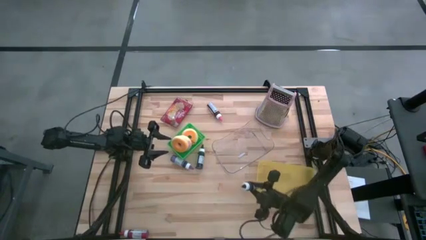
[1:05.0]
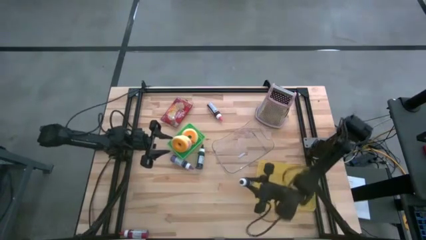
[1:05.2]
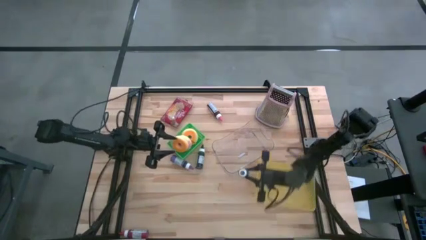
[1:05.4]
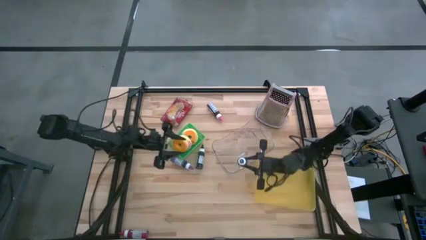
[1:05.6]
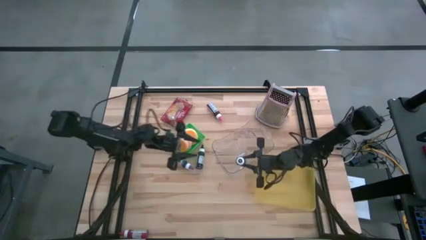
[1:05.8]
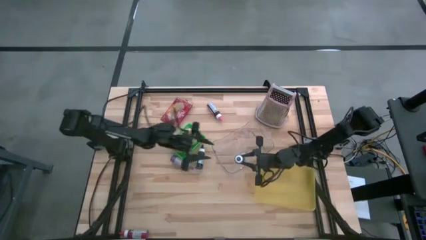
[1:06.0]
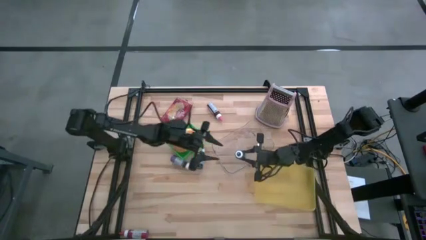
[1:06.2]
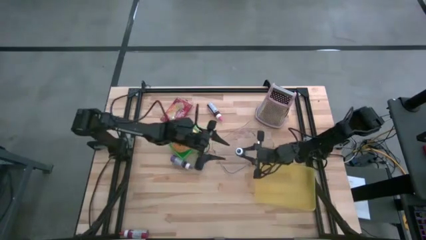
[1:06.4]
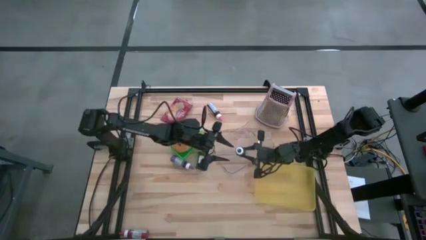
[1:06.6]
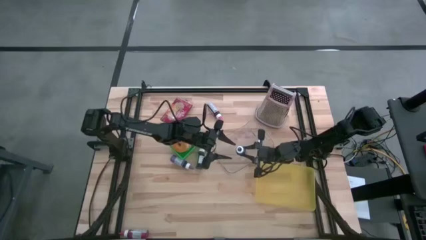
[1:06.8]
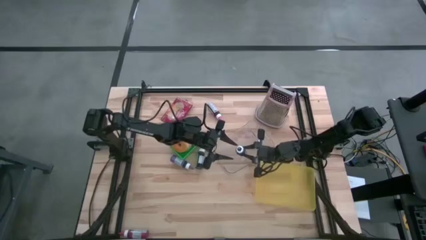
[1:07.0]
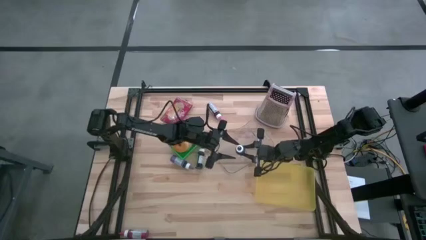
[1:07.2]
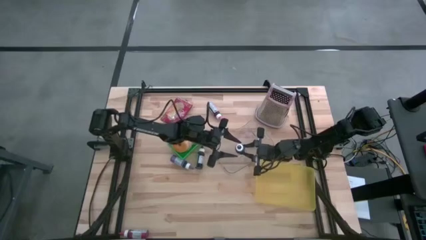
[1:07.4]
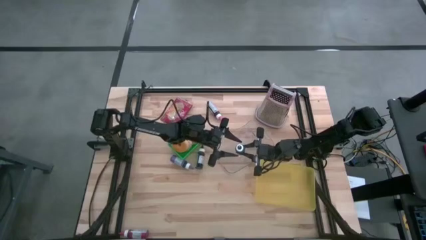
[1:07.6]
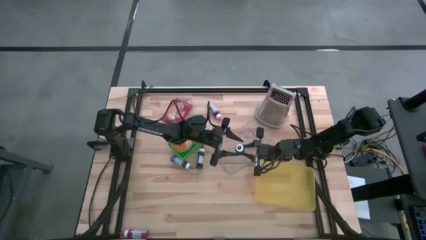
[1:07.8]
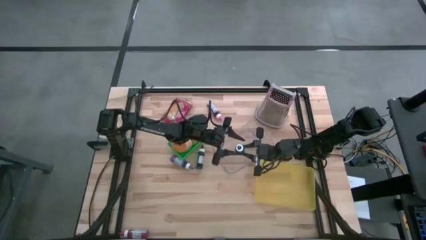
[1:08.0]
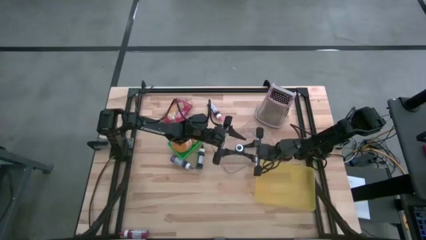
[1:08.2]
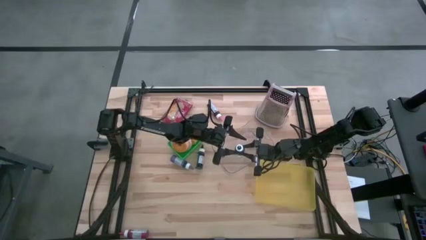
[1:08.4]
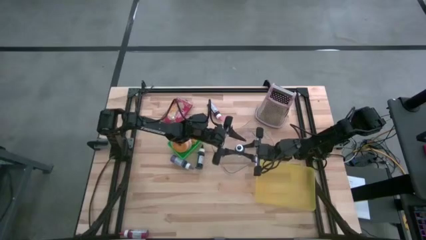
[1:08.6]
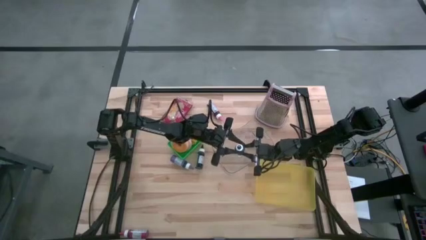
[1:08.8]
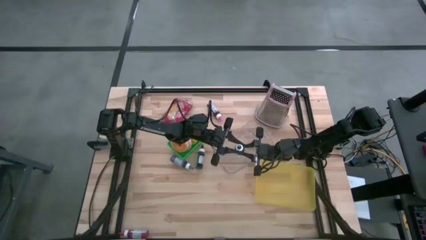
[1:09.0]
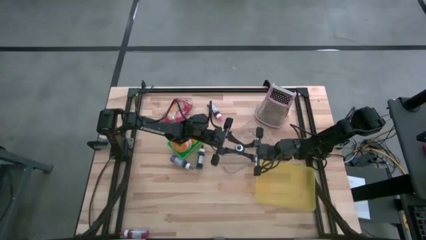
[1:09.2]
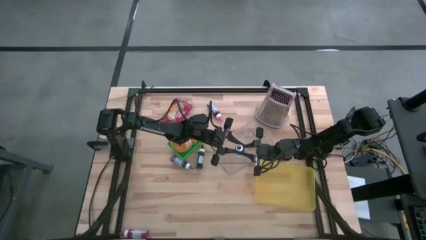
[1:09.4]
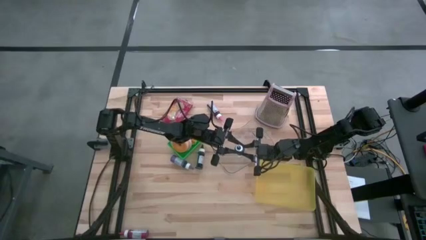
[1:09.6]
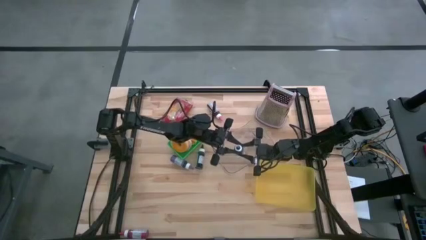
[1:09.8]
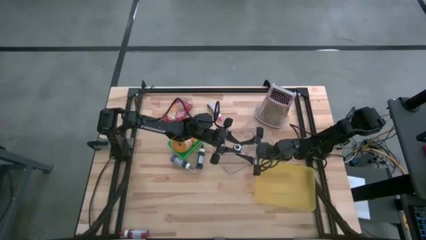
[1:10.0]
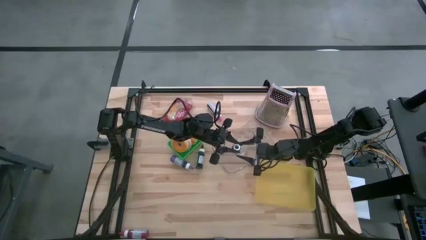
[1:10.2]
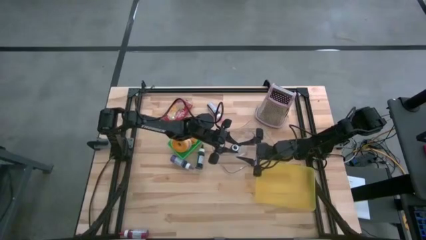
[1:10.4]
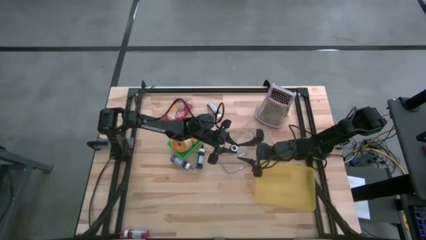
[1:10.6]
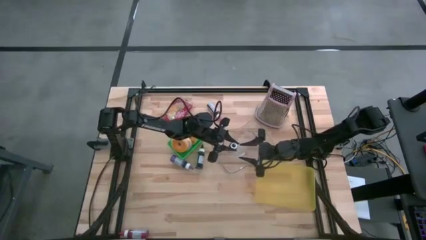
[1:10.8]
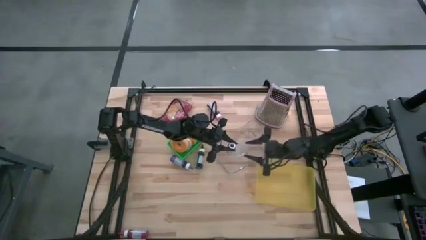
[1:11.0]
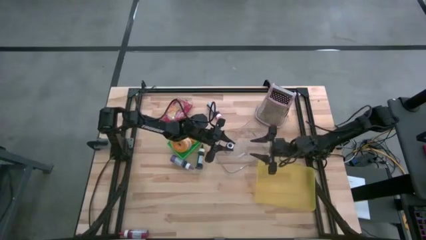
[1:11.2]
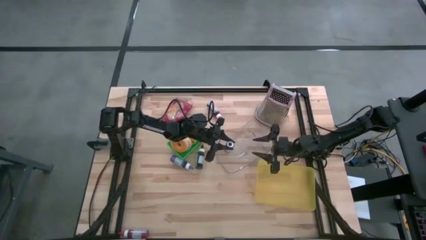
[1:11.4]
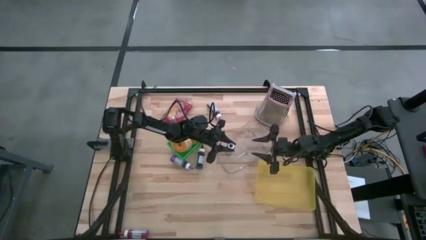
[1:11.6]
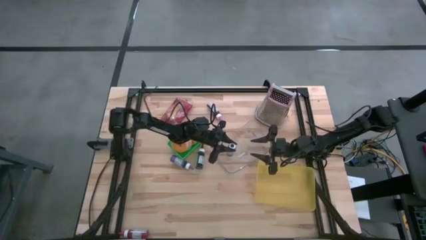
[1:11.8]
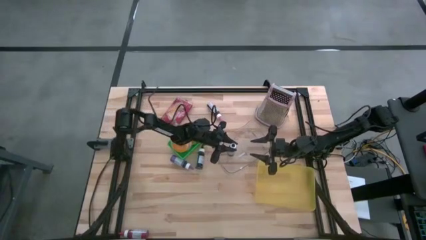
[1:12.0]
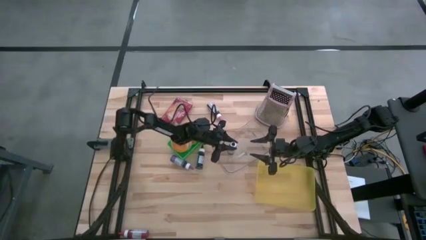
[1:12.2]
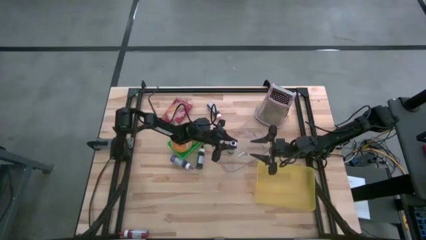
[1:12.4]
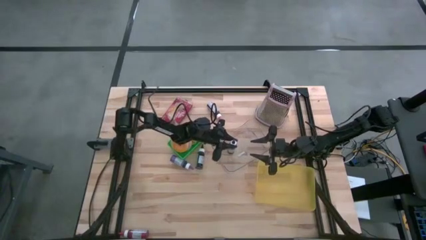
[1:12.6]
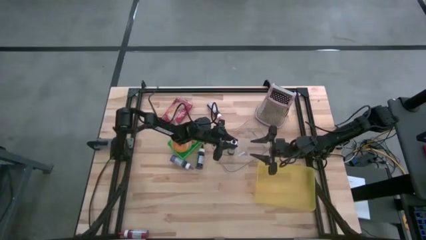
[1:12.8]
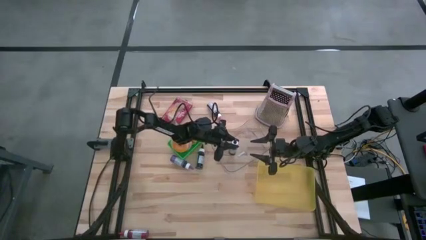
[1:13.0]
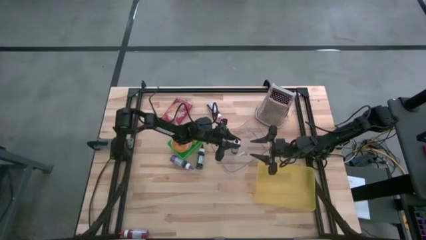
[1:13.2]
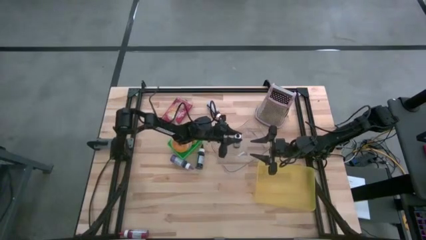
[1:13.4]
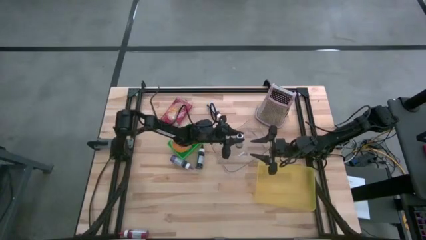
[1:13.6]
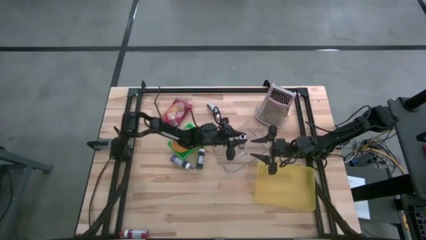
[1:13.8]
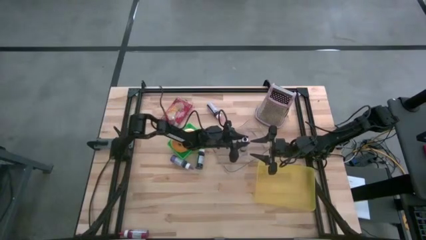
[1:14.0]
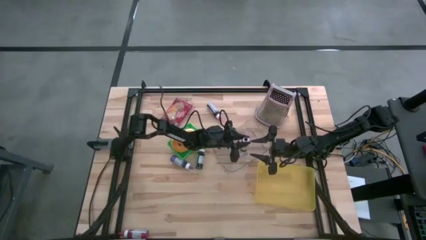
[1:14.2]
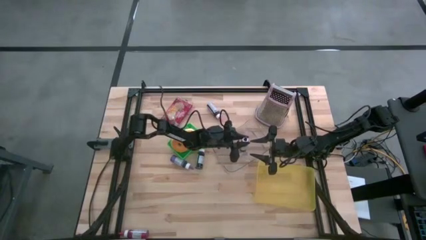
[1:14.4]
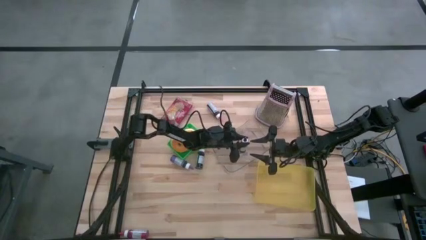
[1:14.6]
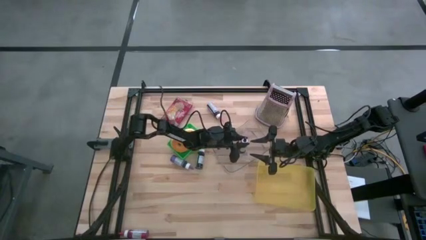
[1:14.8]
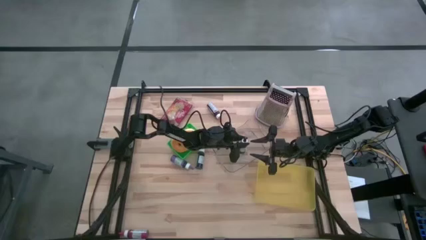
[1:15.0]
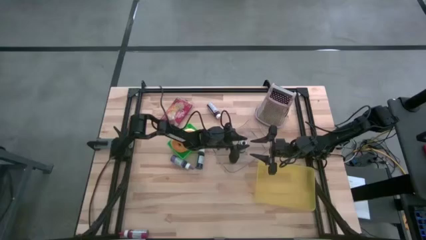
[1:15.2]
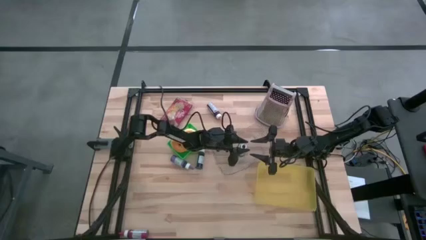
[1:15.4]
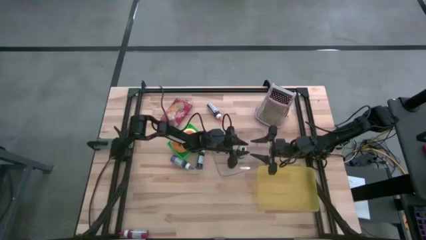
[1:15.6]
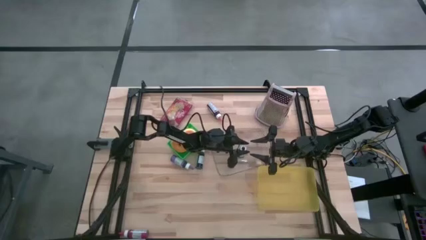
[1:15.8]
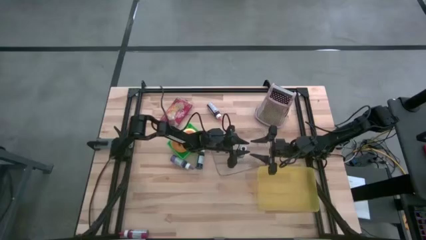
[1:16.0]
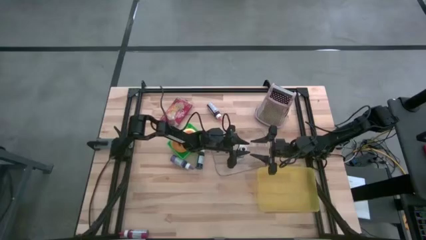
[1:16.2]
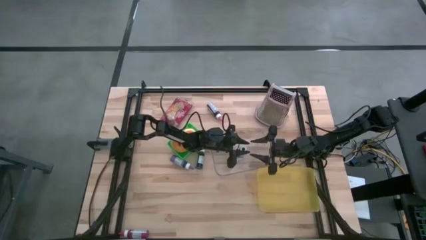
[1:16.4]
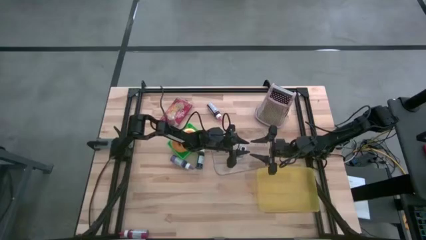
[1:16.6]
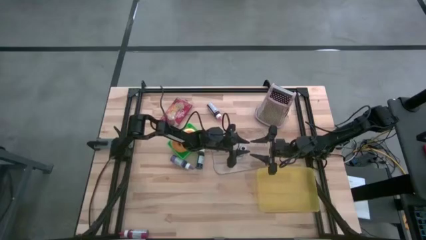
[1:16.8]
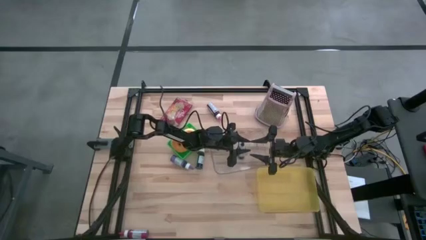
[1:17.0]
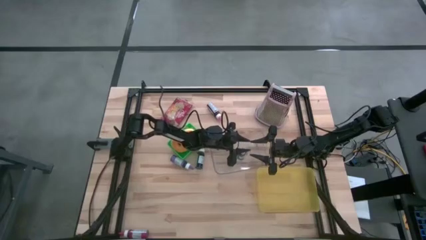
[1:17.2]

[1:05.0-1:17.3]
Task: Pick & Place Food Item
Put the bottom black food coloring bottle into the transparent bin

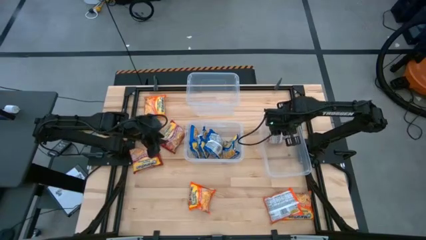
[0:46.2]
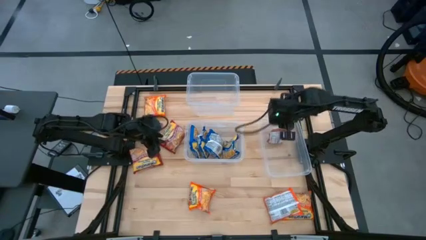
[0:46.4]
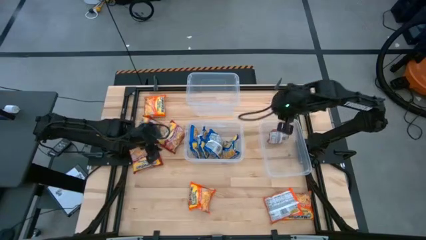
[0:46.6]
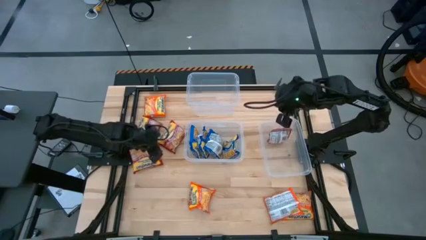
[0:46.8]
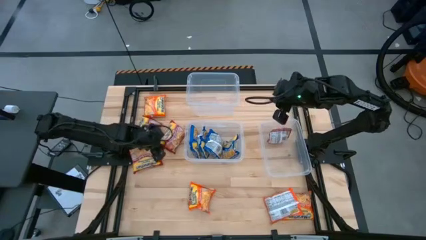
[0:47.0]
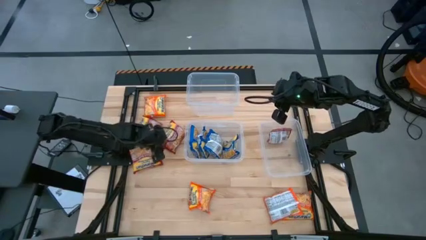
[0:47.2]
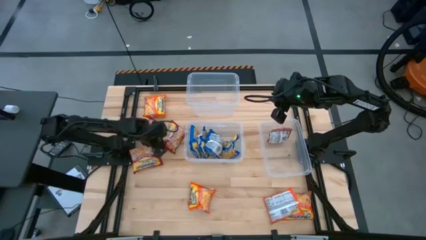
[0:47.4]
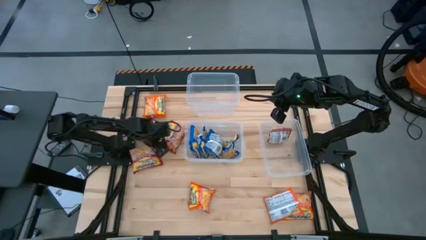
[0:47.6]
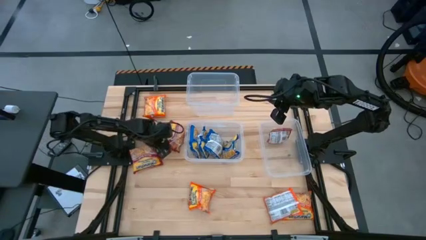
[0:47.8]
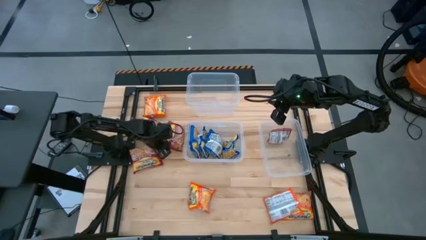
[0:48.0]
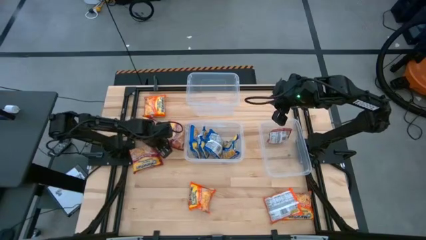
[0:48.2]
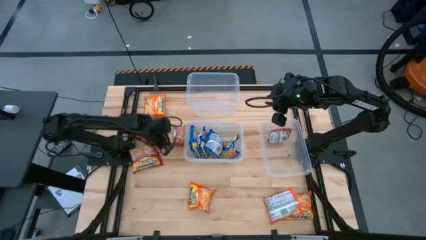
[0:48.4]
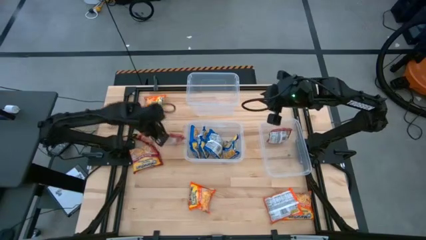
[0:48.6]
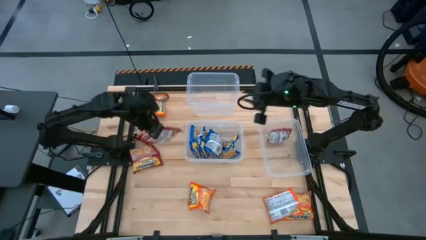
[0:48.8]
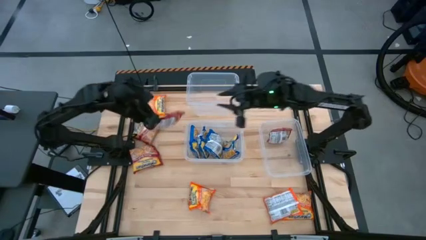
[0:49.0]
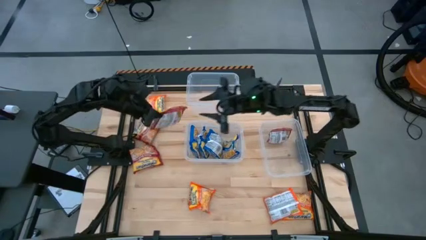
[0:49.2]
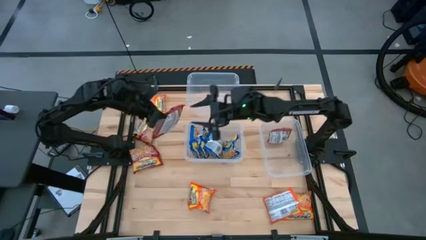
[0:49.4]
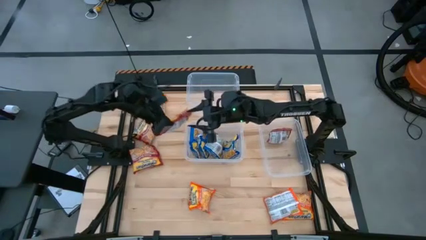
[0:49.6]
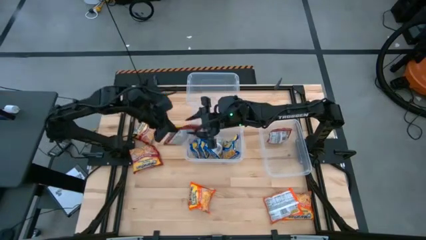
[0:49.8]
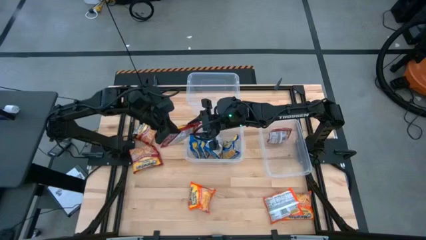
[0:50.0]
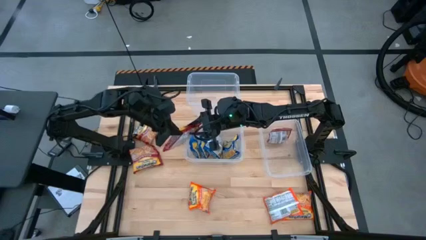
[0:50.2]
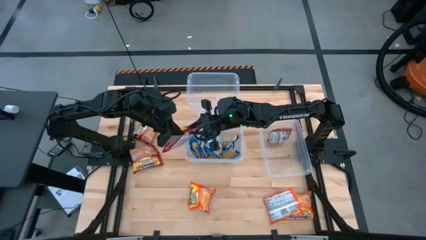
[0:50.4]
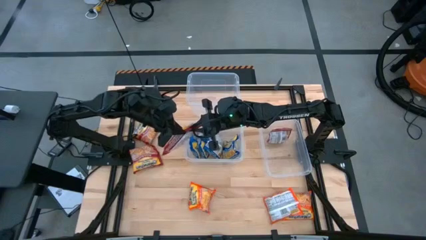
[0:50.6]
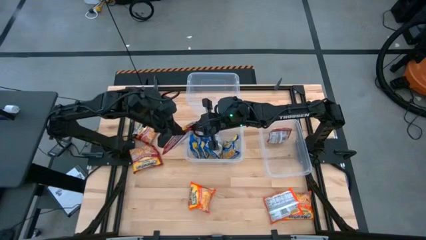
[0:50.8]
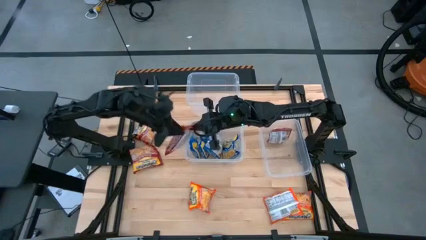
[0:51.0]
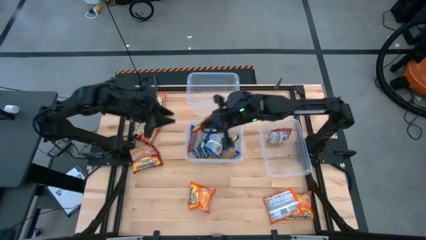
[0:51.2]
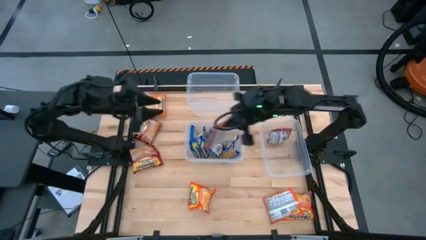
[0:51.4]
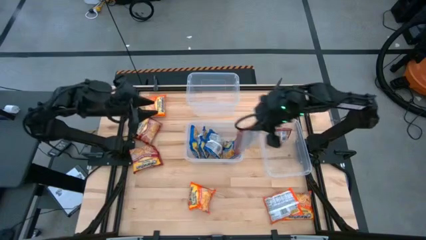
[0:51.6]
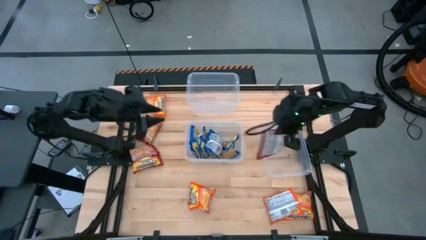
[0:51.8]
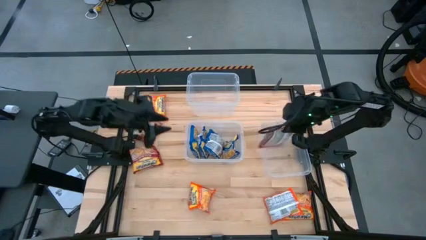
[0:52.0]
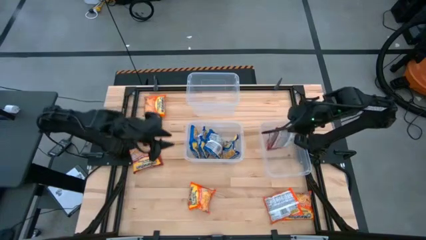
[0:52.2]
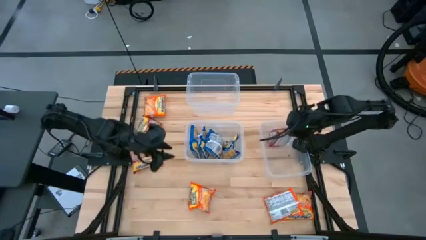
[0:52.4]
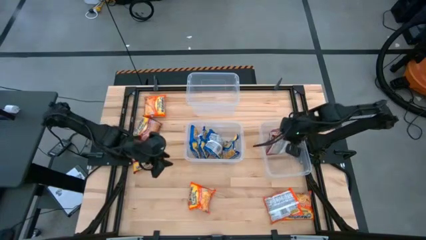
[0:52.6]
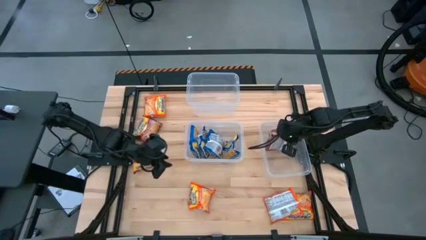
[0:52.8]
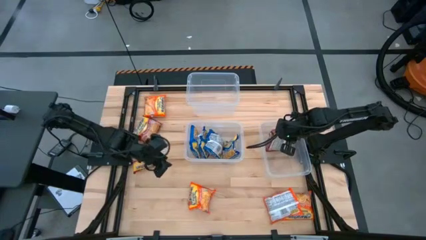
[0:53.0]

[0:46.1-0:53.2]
Task: Sort Maruchan noodles
Put the red noodle pack into the bottom right transparent bin
